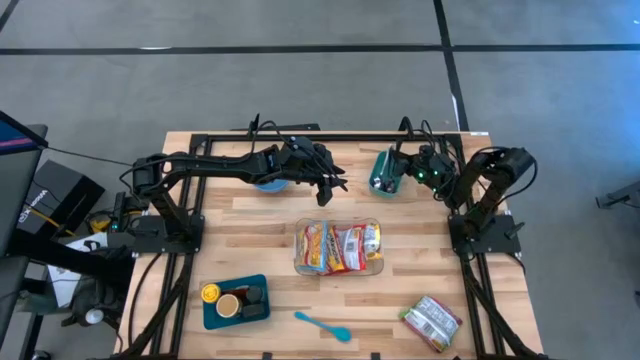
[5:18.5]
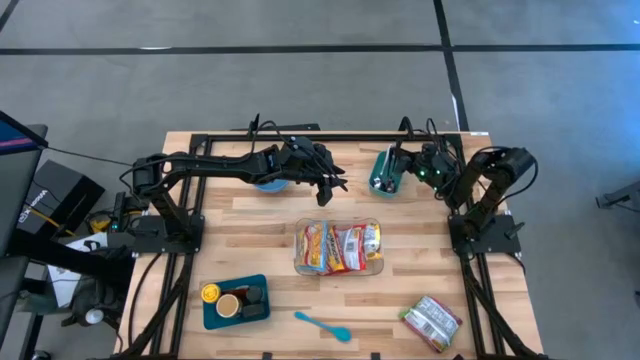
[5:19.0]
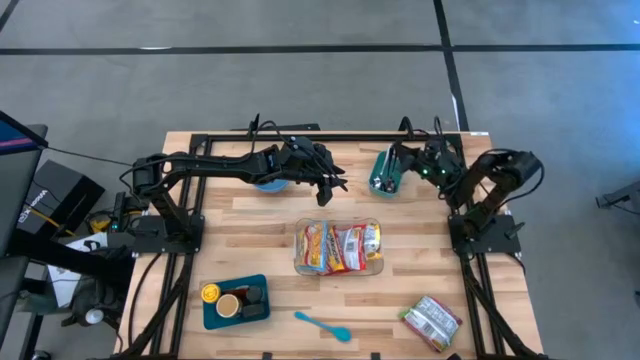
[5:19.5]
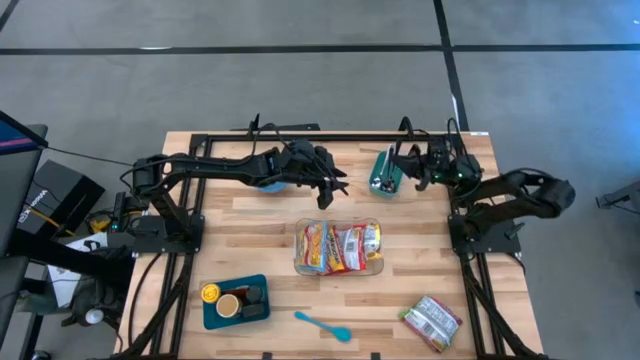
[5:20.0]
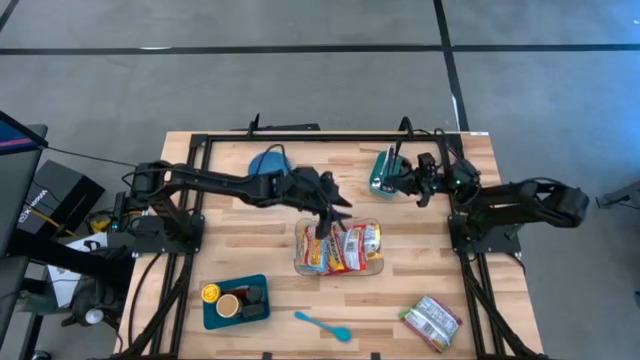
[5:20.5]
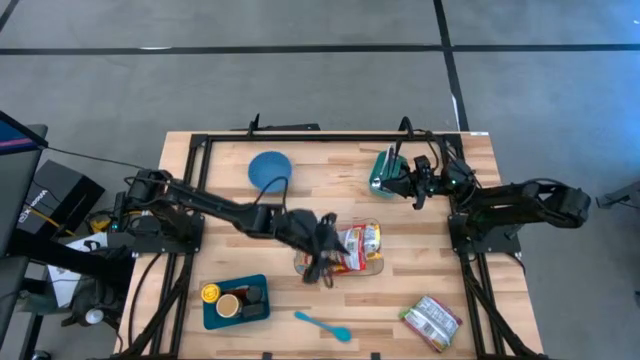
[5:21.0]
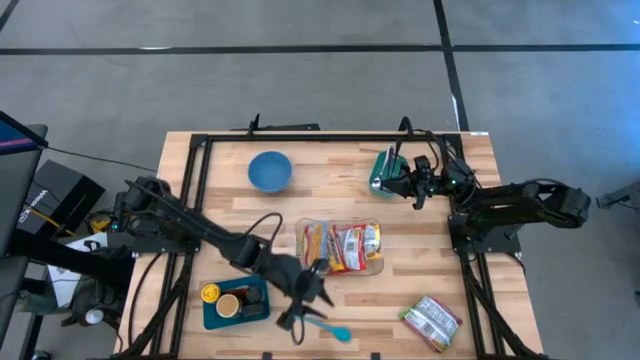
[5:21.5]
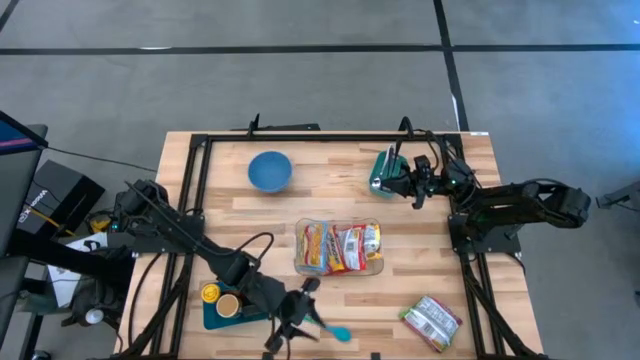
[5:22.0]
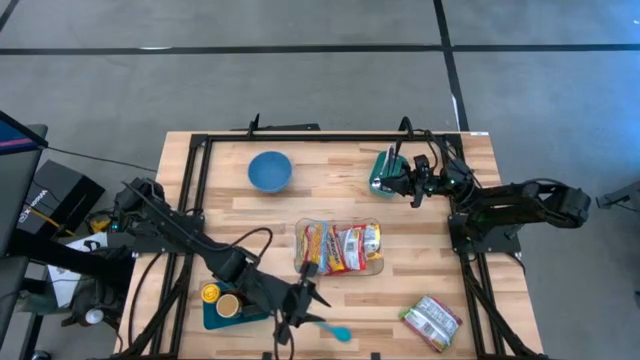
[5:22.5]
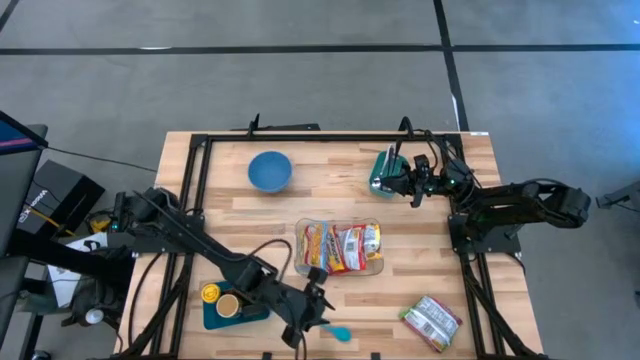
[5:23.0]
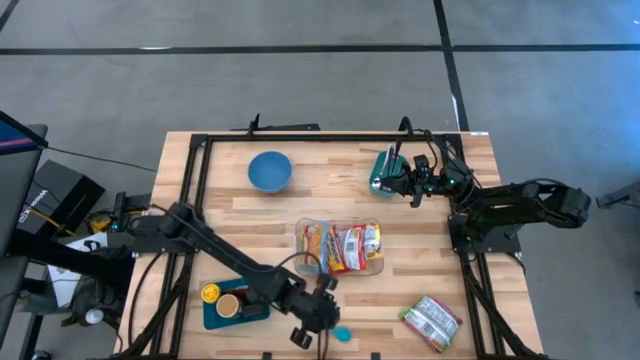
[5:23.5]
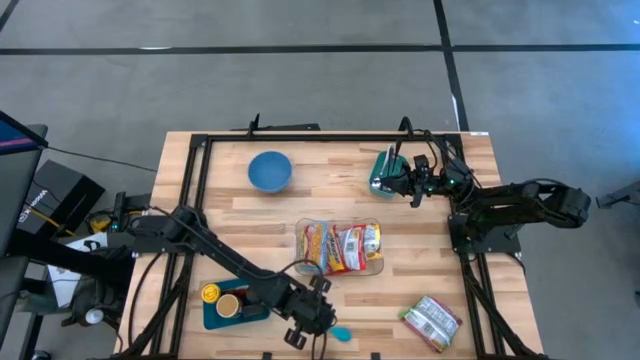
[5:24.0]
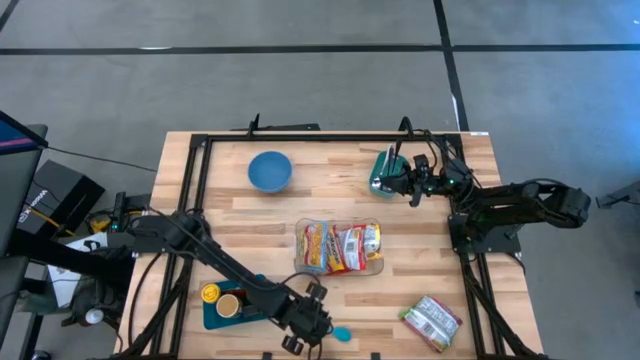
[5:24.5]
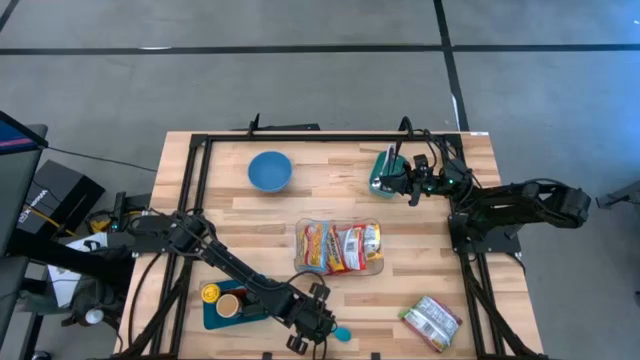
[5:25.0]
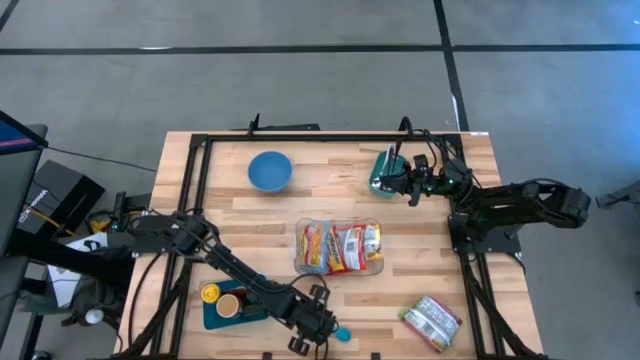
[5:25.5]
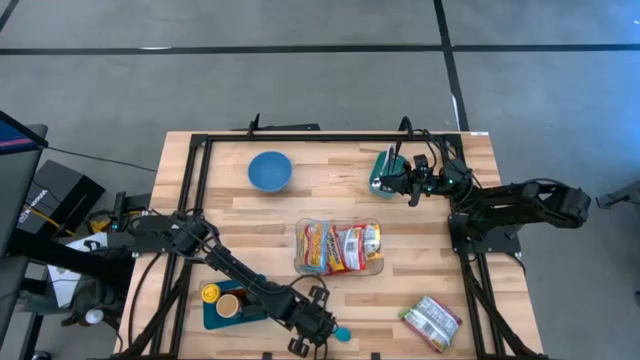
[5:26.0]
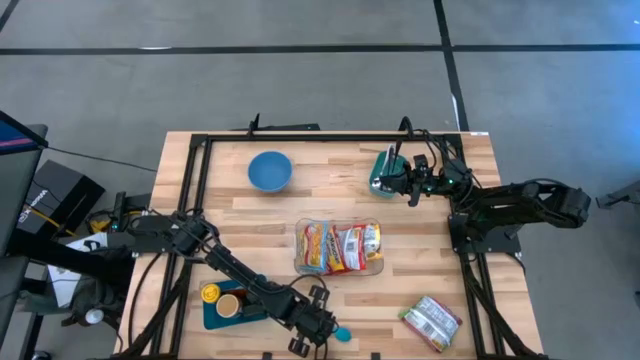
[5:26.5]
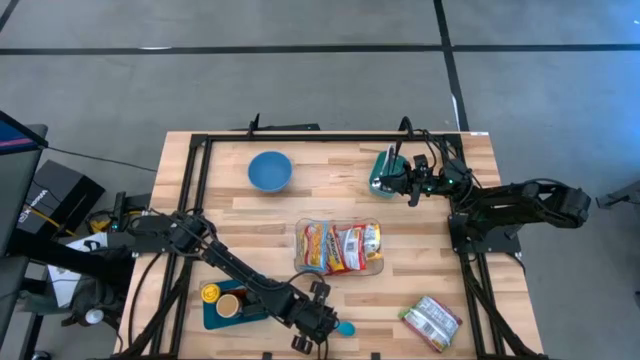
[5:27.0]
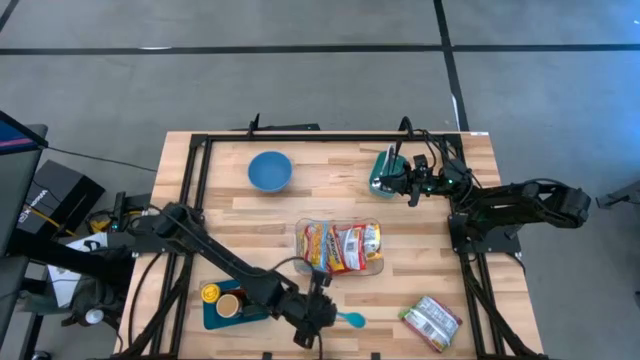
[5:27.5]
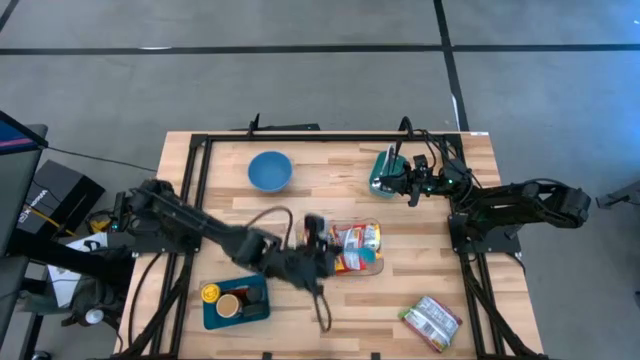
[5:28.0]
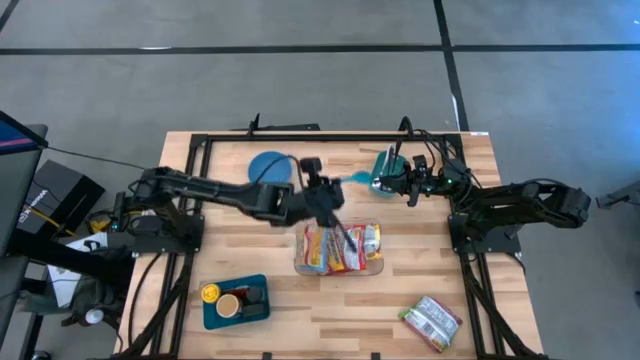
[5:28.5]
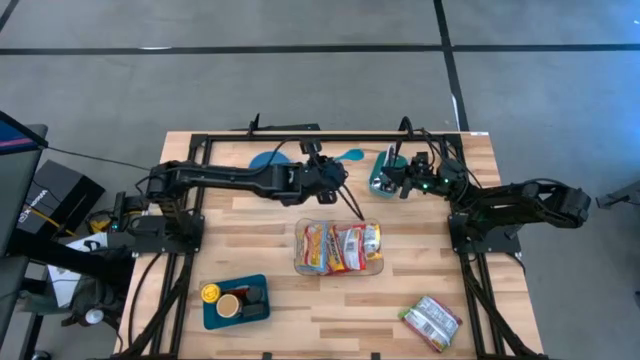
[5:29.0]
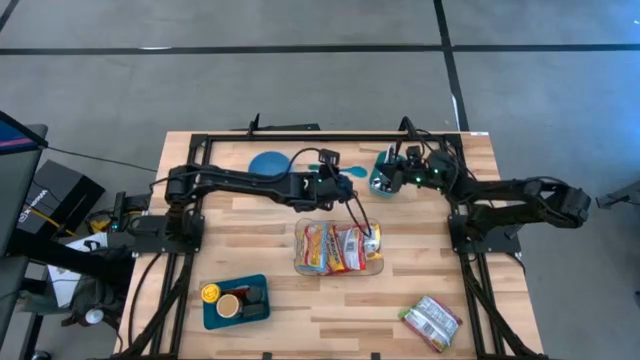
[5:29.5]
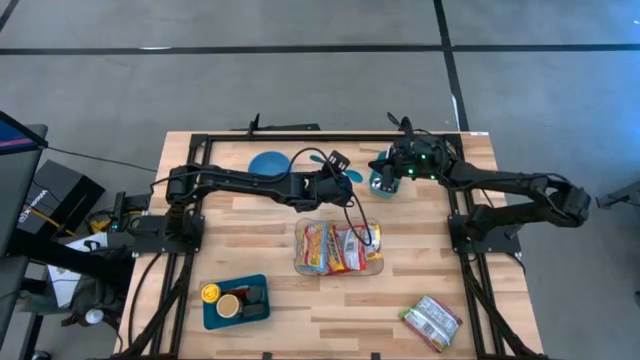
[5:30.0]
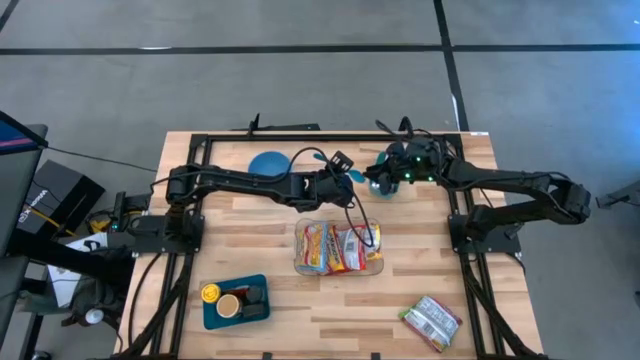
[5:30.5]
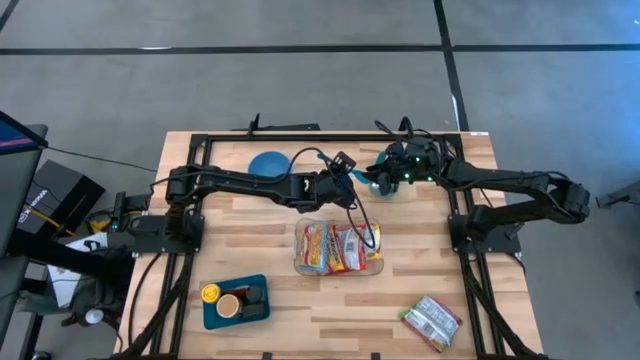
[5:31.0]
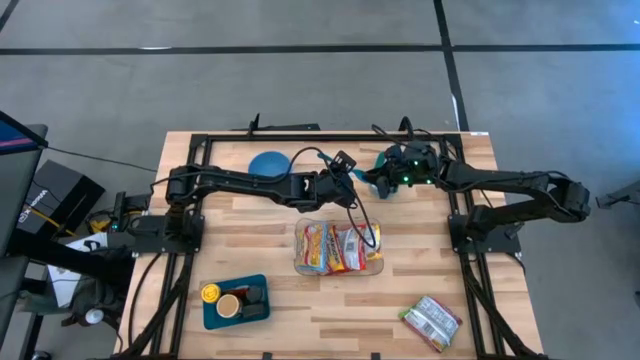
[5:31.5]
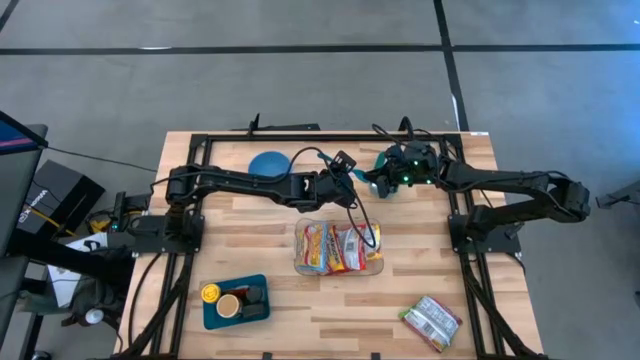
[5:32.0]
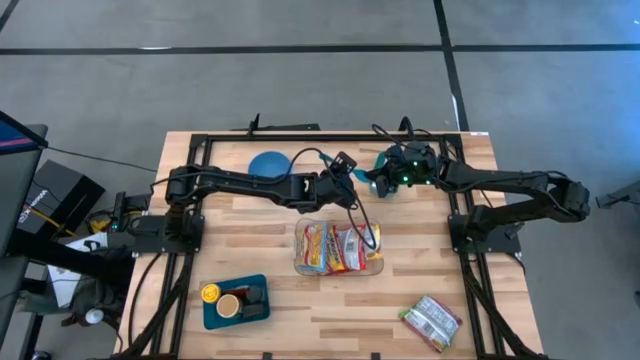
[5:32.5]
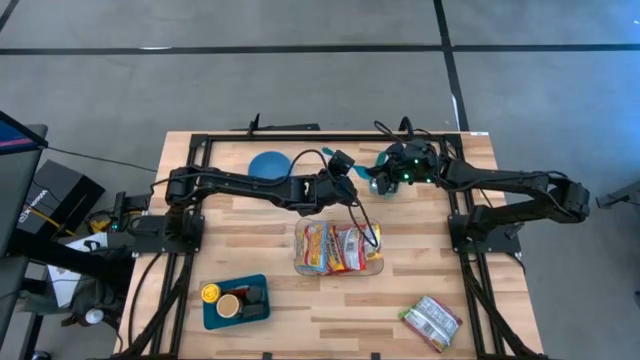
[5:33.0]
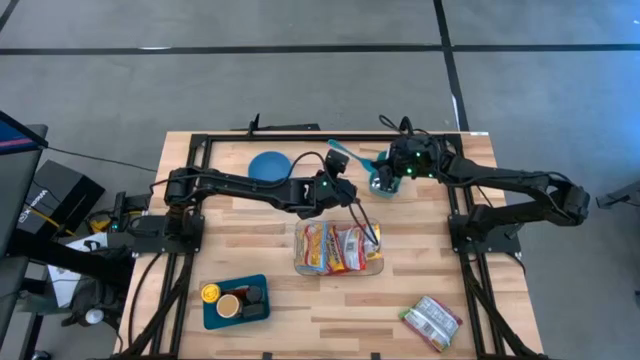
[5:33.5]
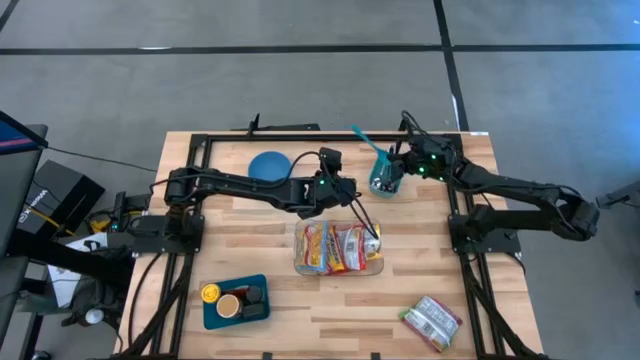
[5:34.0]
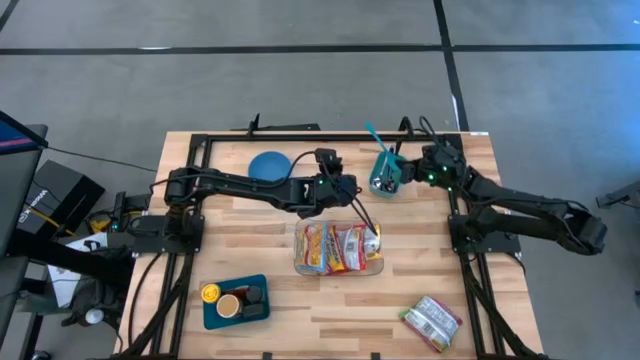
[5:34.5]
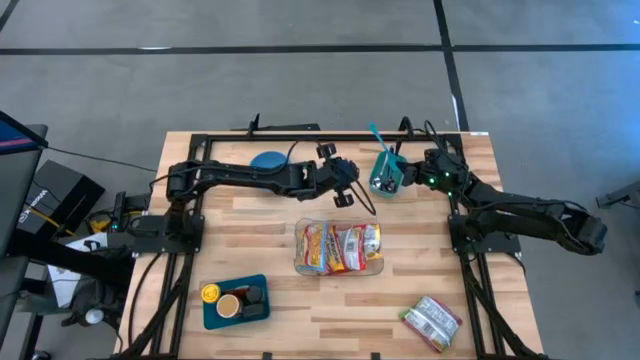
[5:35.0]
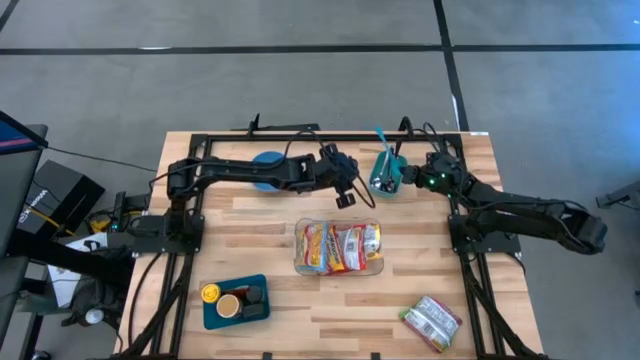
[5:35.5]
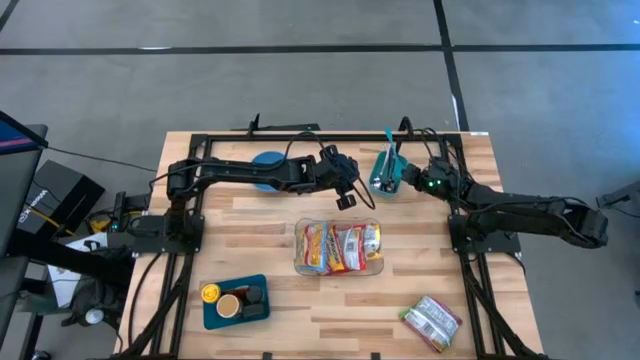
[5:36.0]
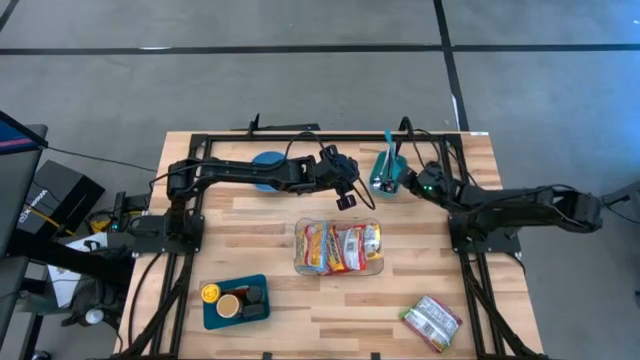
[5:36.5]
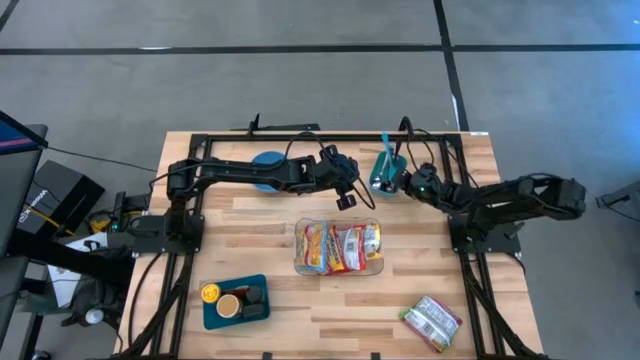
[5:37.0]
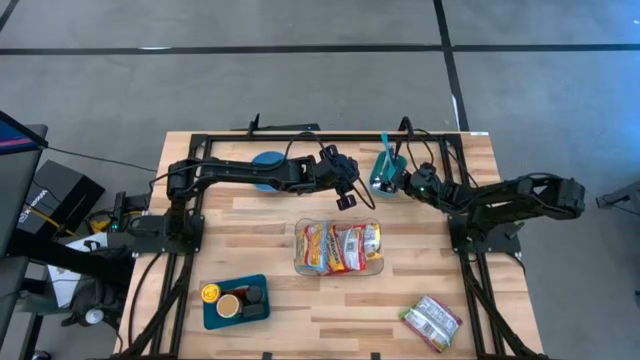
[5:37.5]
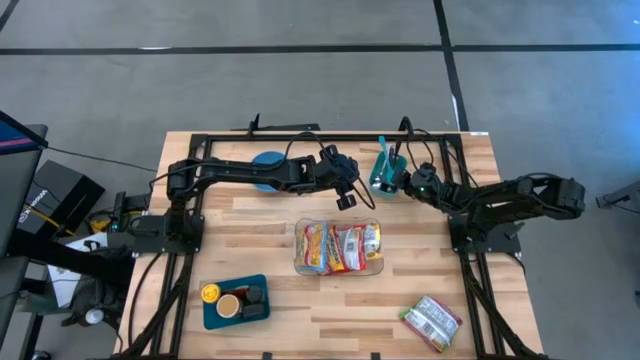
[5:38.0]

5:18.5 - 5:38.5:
Task: Pick & Place Food Item
Put the blue baby spoon into the blue bin

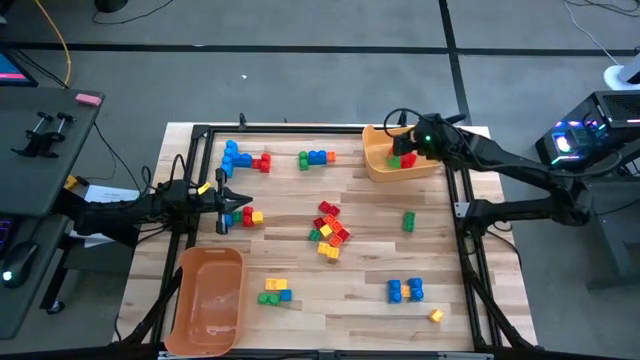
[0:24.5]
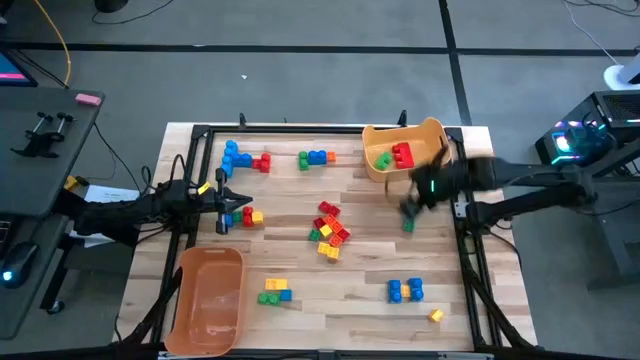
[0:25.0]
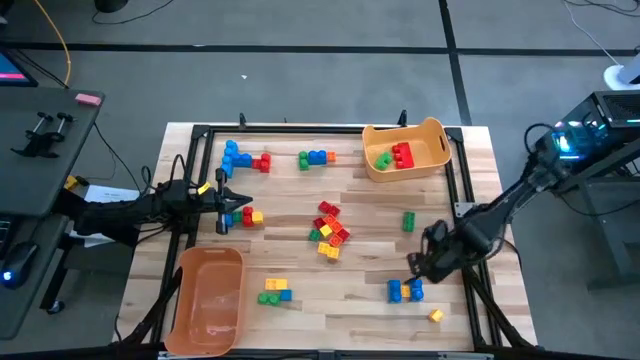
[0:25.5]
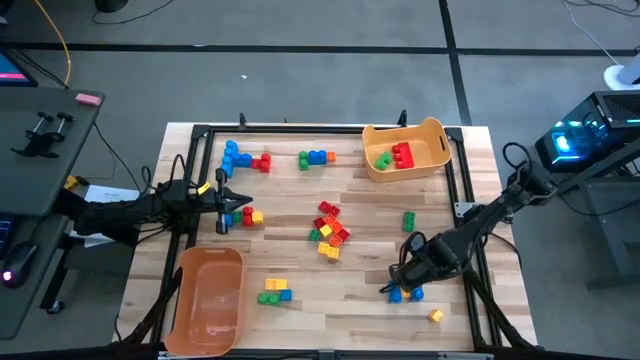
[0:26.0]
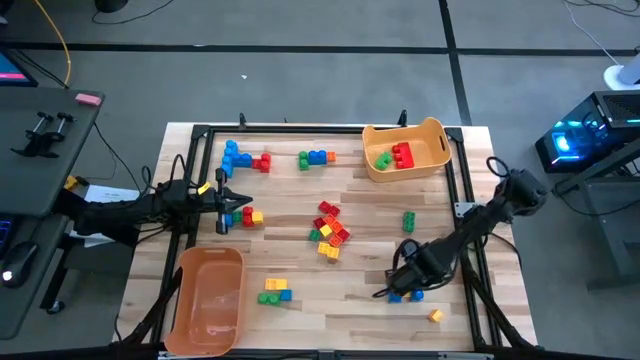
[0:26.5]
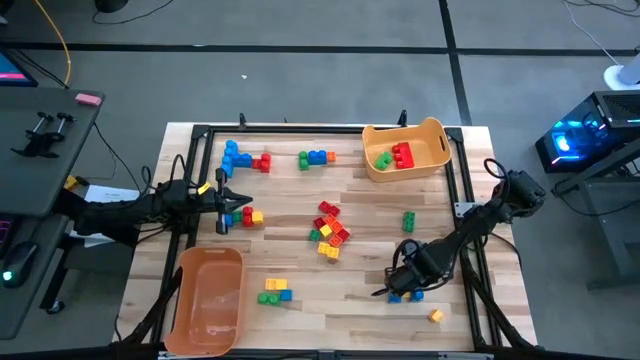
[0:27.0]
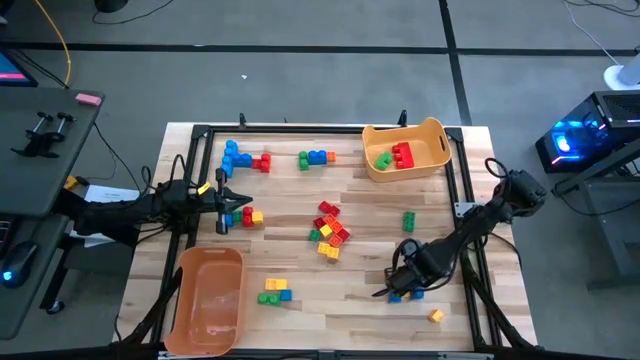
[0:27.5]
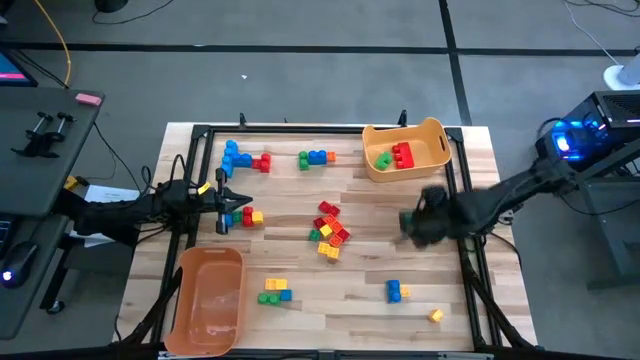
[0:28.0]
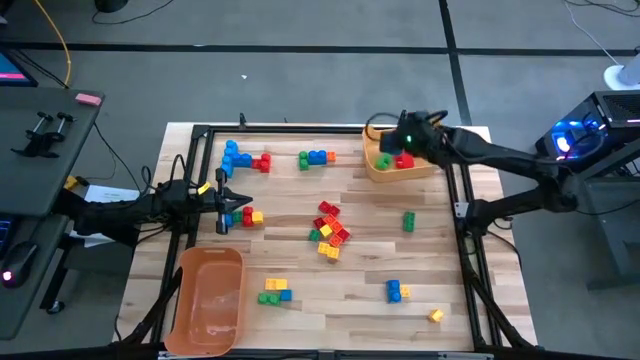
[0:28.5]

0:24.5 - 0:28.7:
Task: Sort blocks by size
Put the blue game piece into the yellow bin
